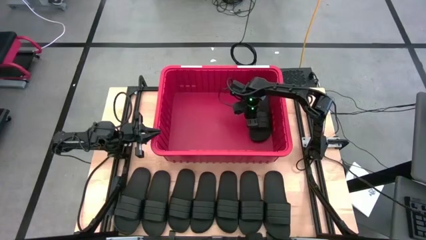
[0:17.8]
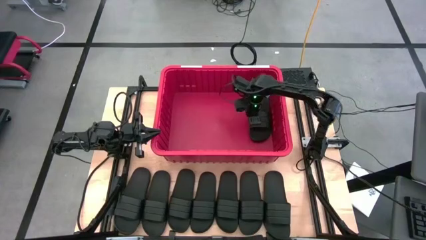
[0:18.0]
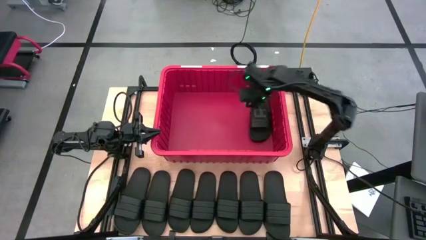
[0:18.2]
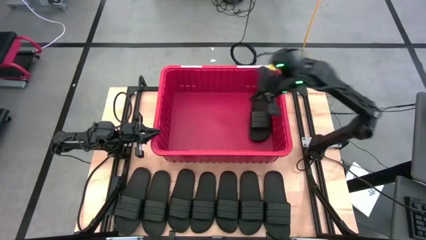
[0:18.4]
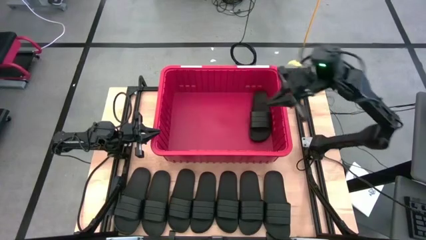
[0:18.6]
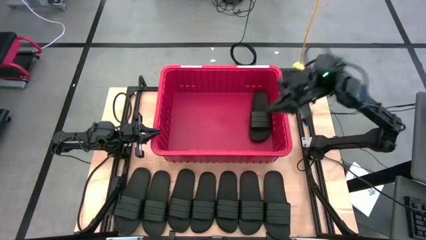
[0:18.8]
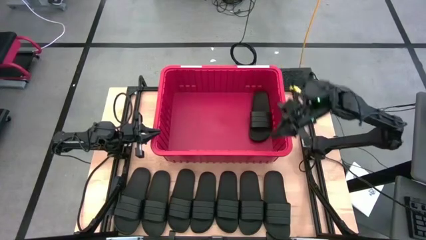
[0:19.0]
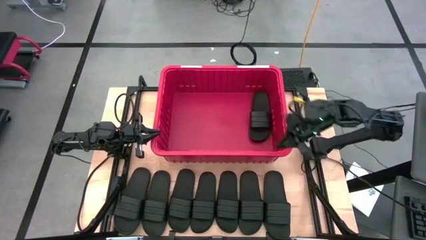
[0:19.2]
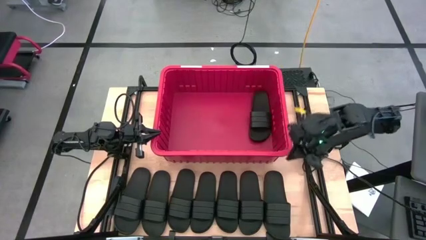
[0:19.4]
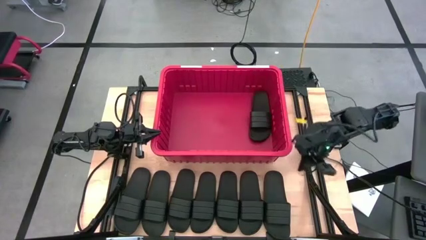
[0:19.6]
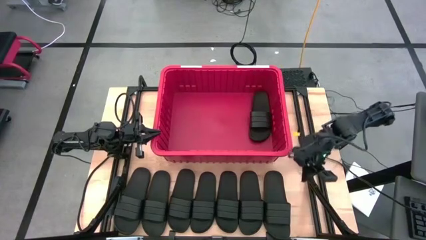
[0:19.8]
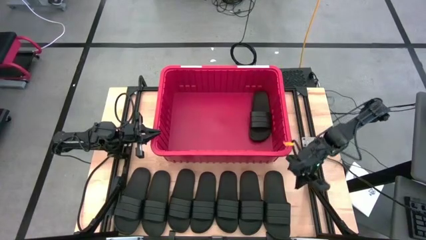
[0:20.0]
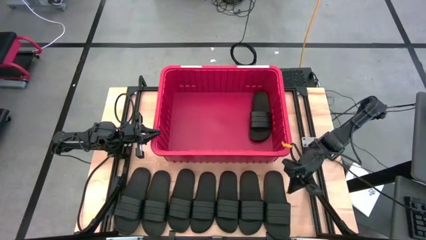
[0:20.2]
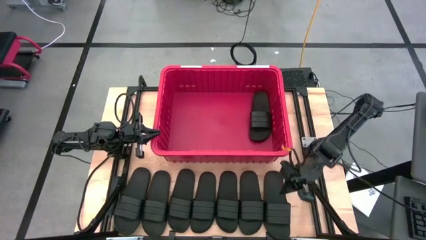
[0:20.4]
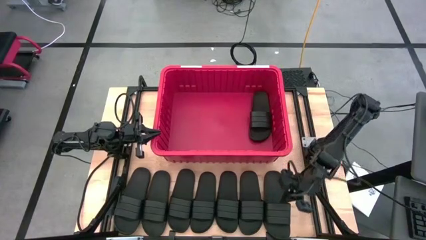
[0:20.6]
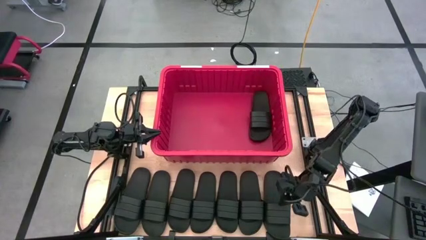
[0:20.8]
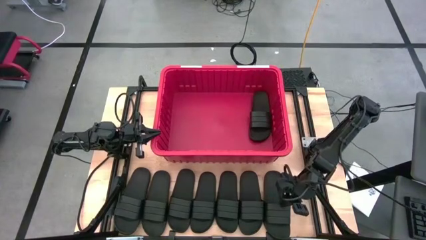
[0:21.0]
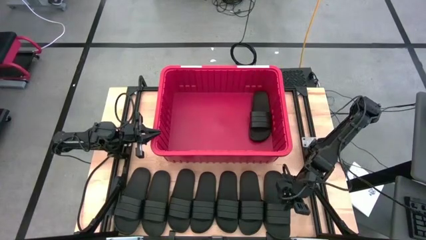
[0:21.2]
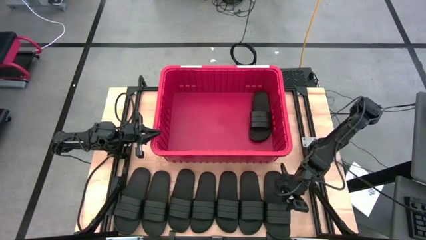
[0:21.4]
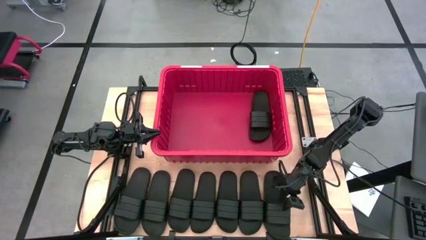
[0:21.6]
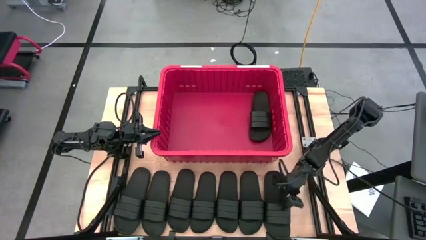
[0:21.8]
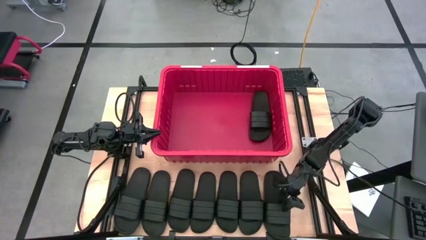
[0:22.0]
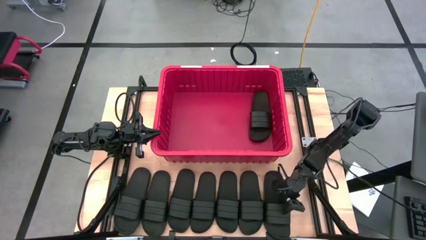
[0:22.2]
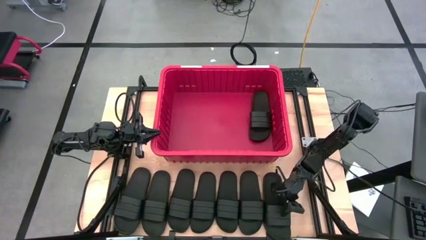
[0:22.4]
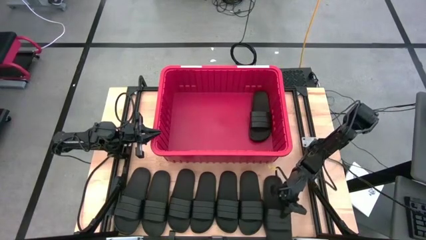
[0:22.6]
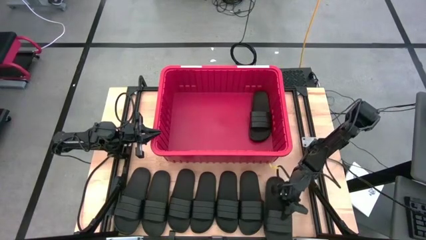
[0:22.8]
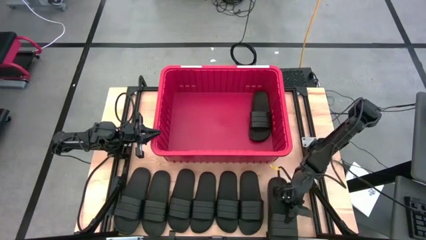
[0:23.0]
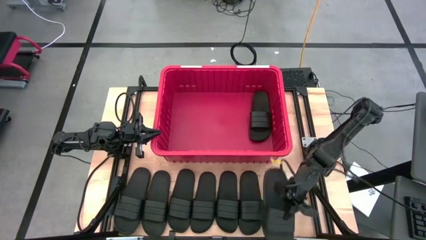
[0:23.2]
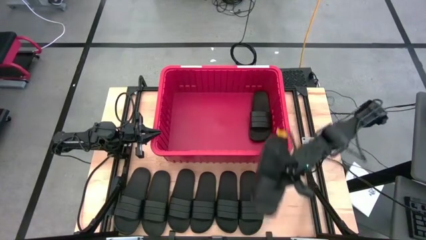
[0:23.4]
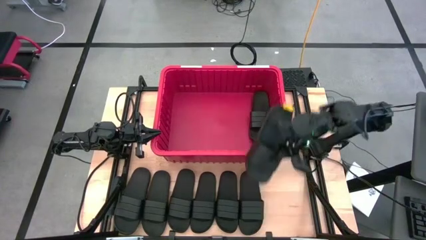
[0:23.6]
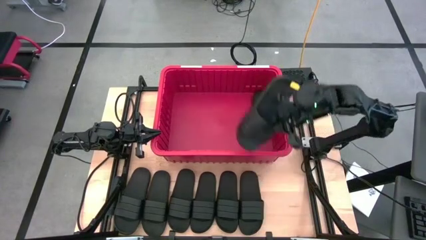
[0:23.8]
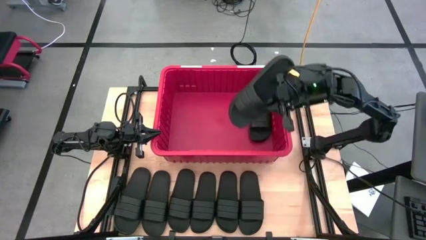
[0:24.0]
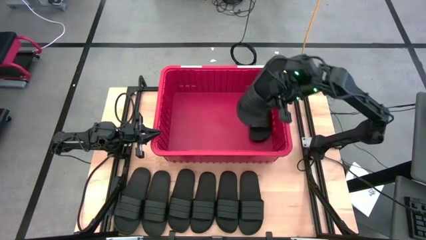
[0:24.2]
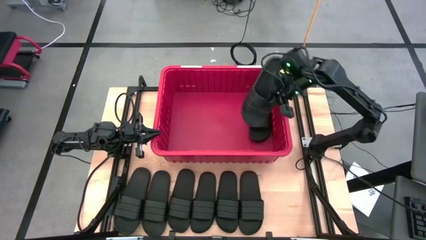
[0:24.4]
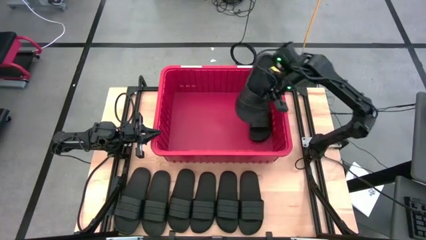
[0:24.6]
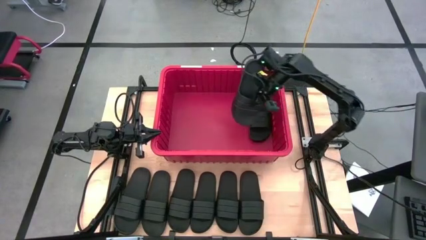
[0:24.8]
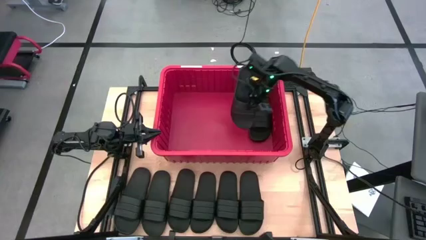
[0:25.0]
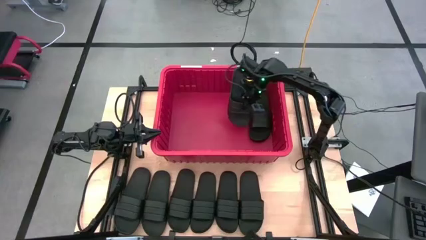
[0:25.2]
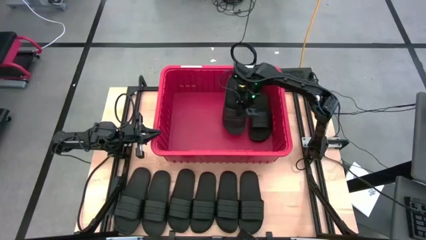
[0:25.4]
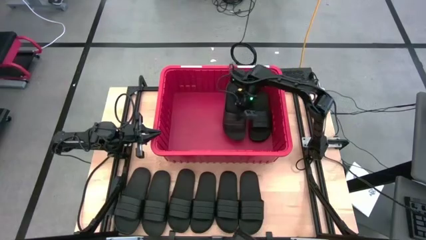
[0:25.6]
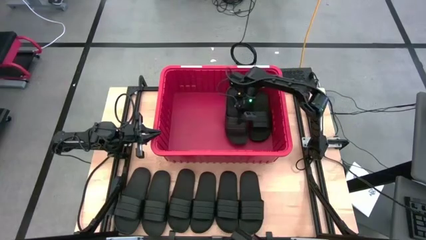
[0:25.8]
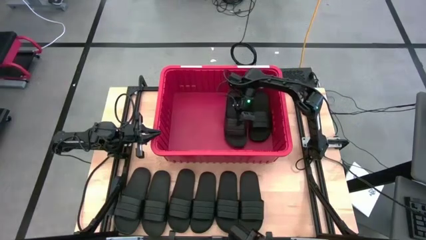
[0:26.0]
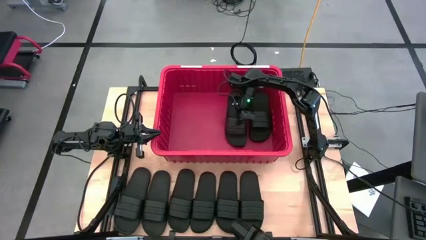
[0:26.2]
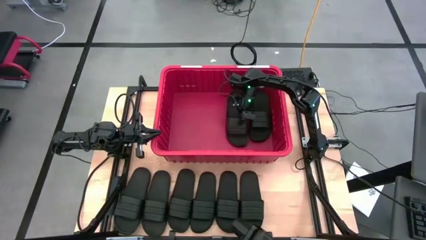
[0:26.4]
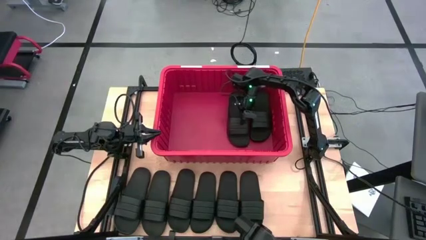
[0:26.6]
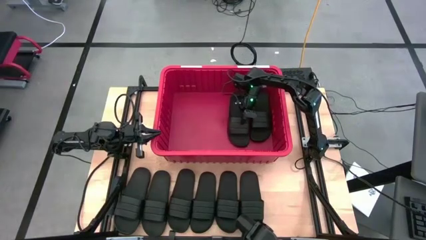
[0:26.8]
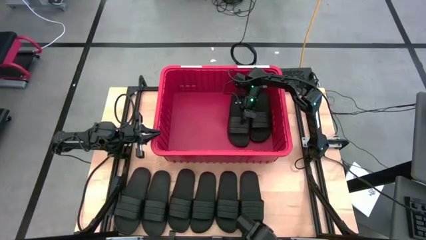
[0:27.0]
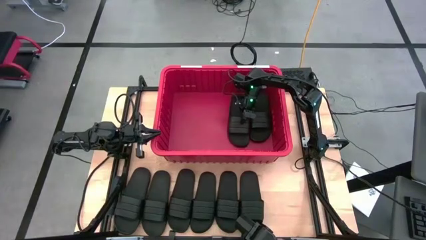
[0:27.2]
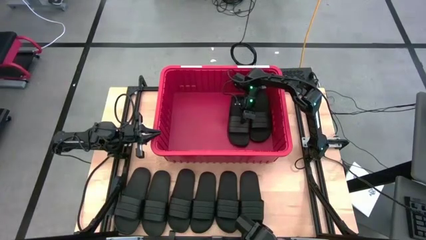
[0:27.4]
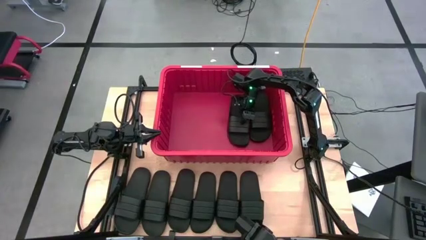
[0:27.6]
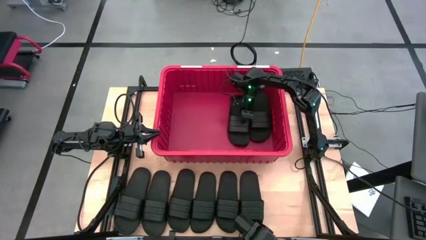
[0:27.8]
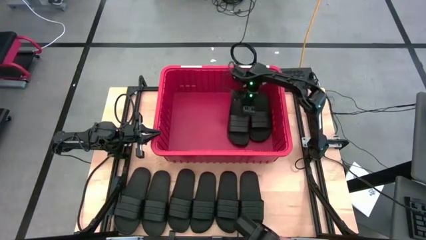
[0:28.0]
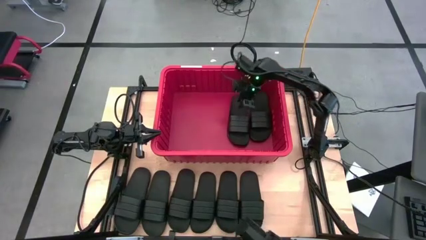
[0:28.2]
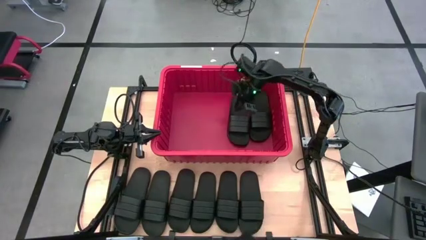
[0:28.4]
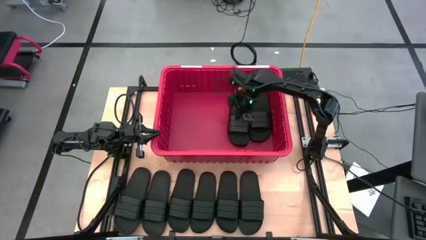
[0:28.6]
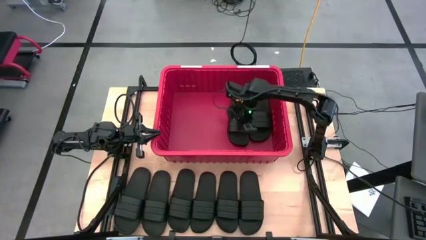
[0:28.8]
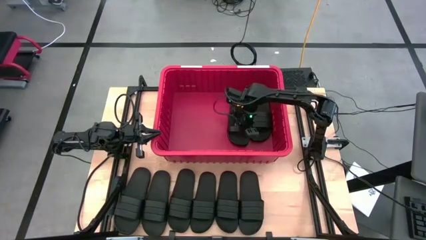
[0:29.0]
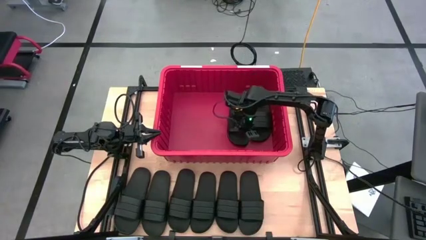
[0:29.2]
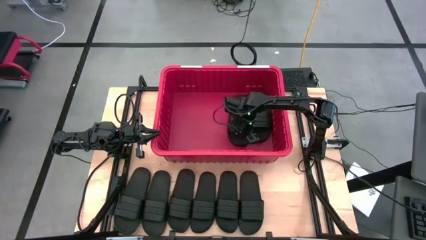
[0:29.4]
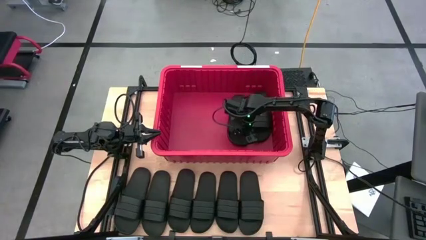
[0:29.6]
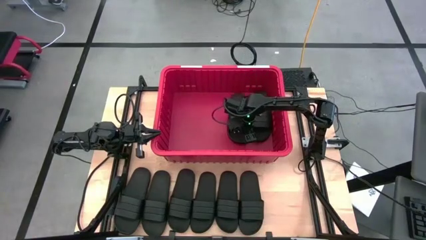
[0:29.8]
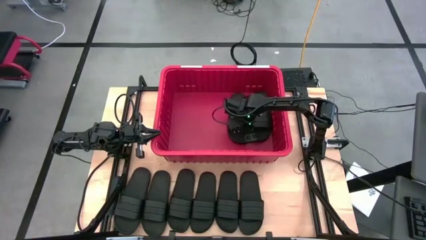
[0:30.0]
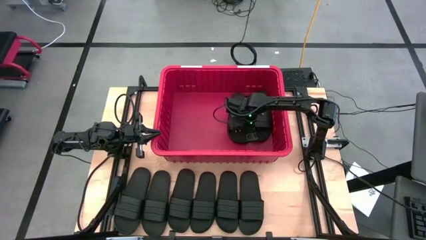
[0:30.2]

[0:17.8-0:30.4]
Task: Pick and place slides into bin
Put the black slipper into the bin
